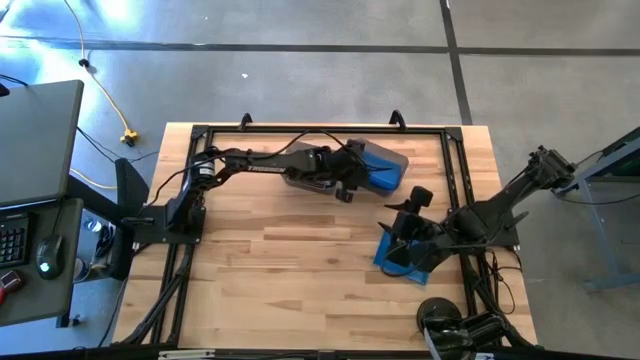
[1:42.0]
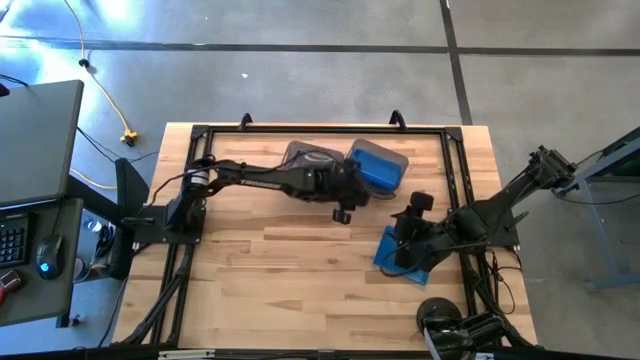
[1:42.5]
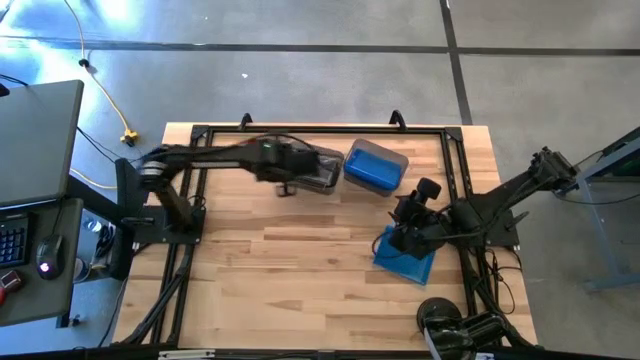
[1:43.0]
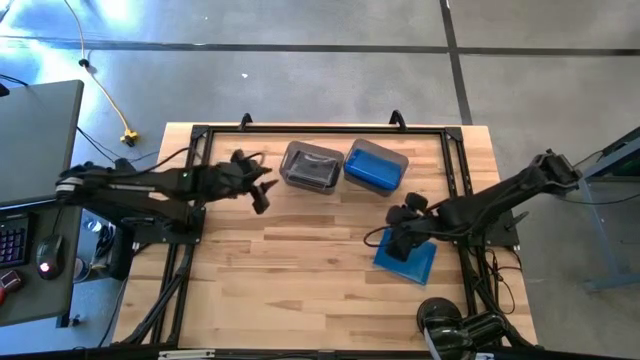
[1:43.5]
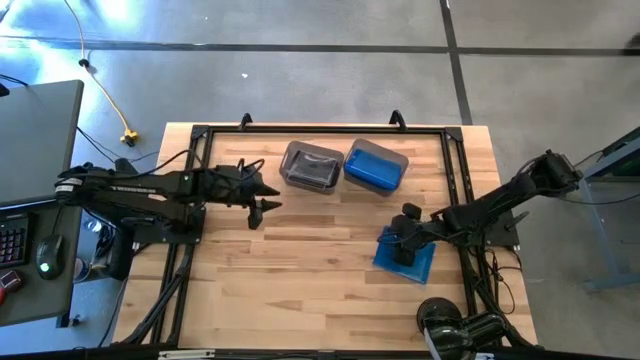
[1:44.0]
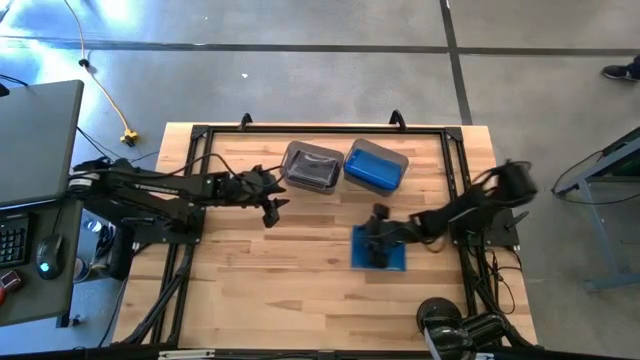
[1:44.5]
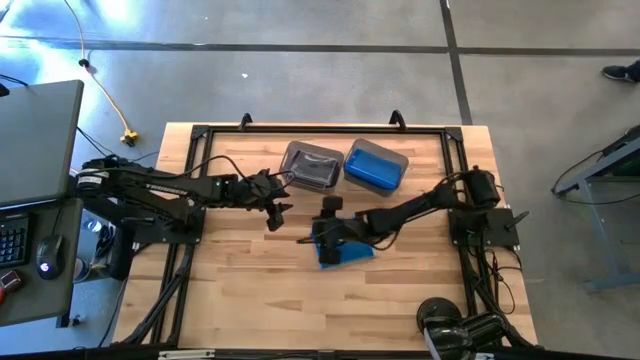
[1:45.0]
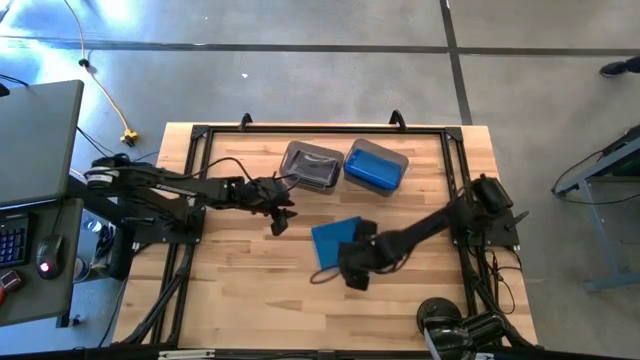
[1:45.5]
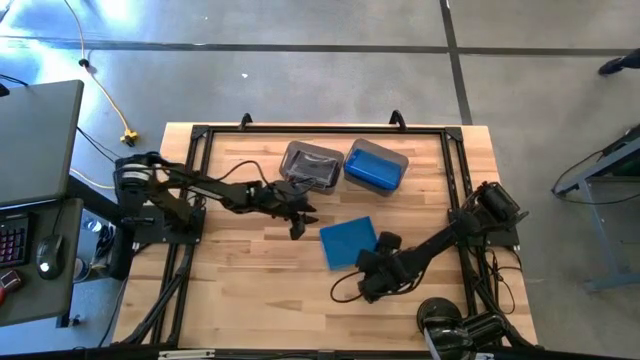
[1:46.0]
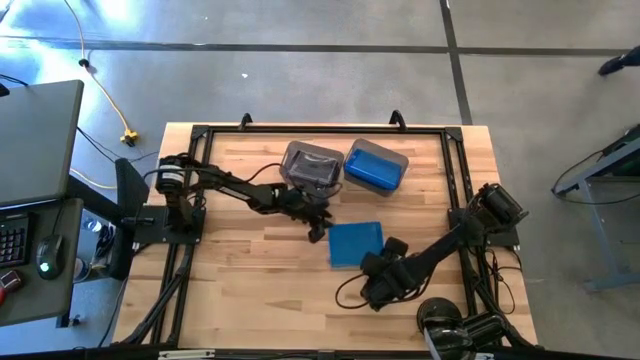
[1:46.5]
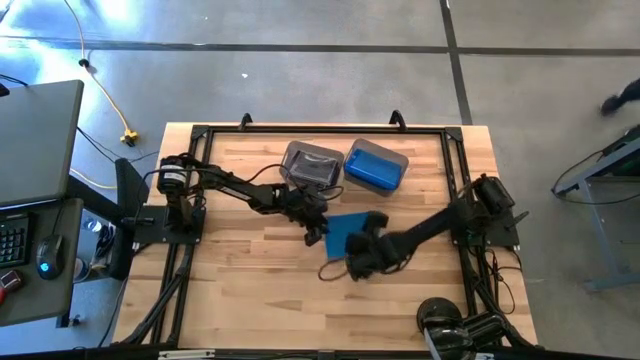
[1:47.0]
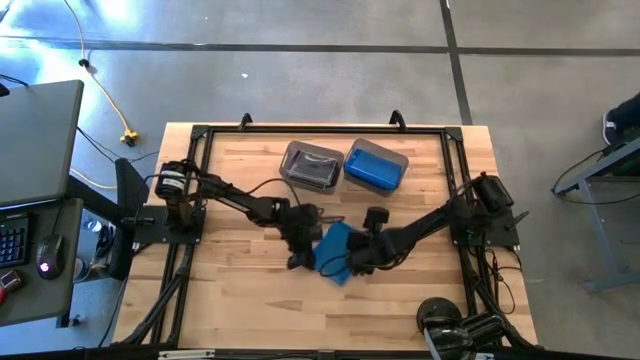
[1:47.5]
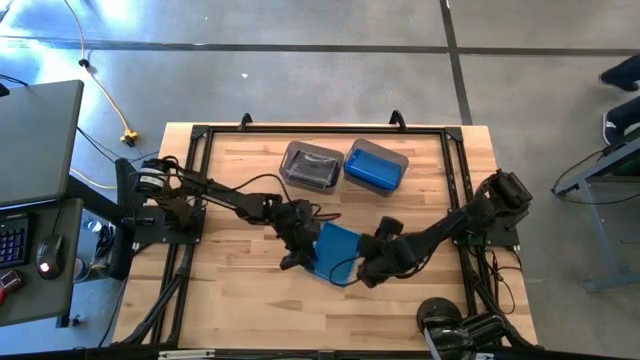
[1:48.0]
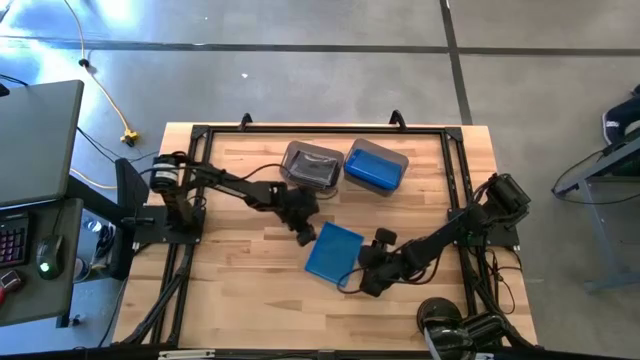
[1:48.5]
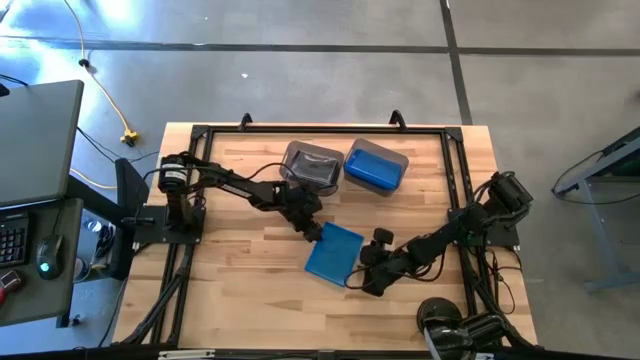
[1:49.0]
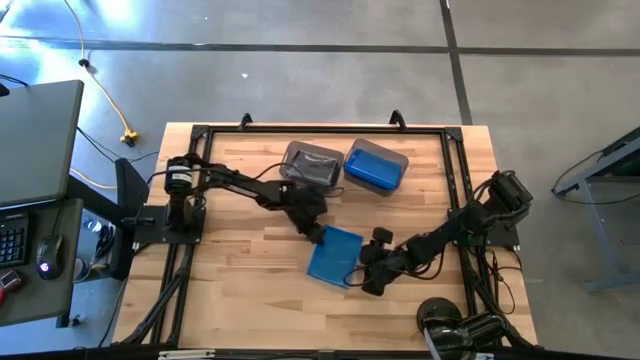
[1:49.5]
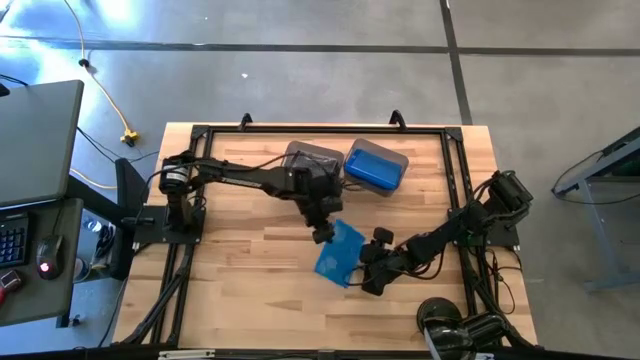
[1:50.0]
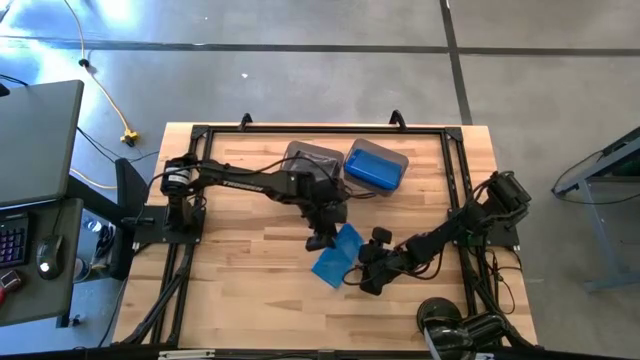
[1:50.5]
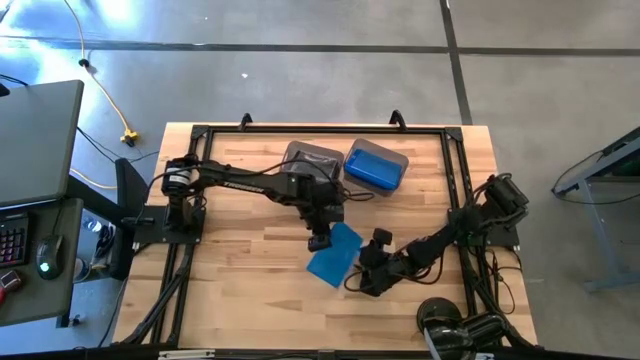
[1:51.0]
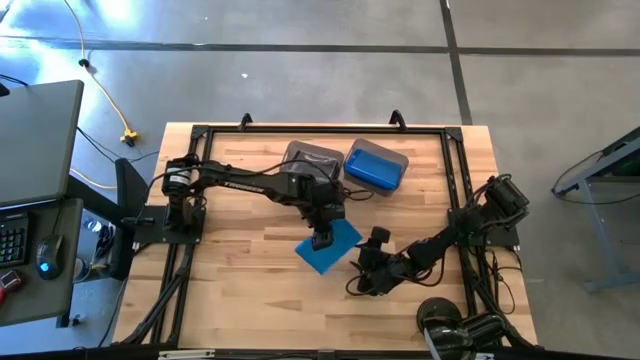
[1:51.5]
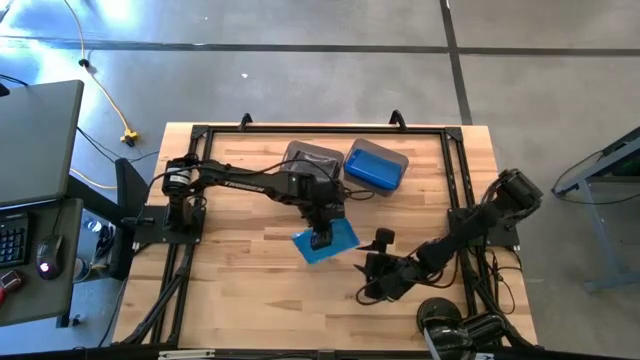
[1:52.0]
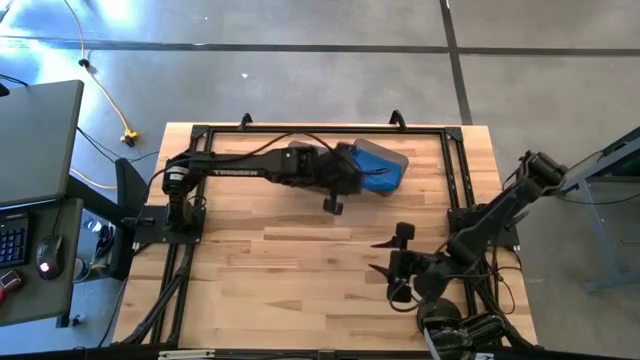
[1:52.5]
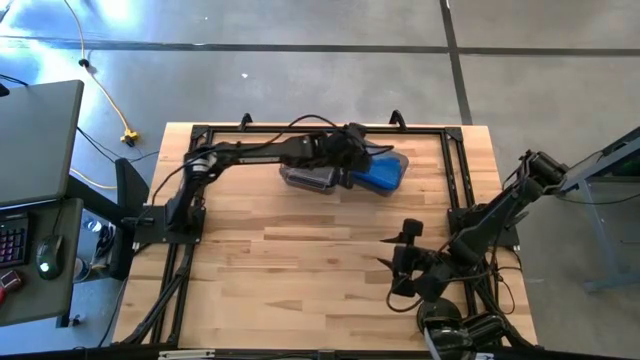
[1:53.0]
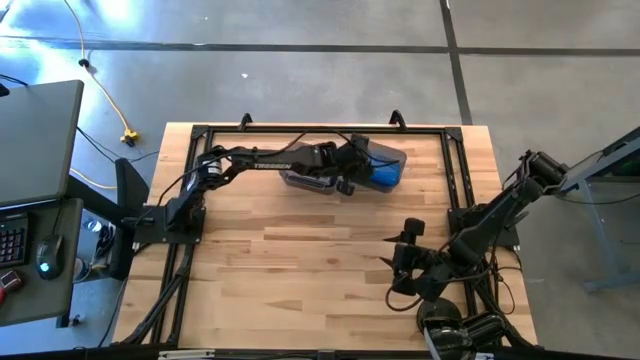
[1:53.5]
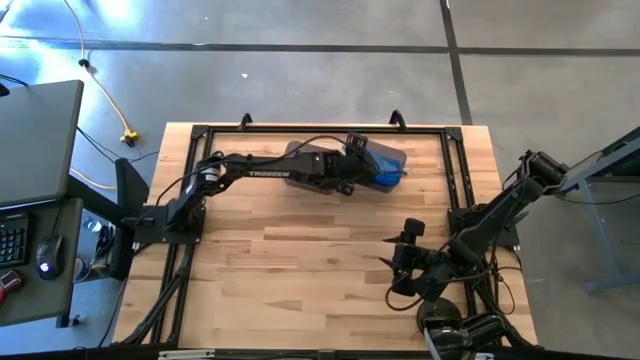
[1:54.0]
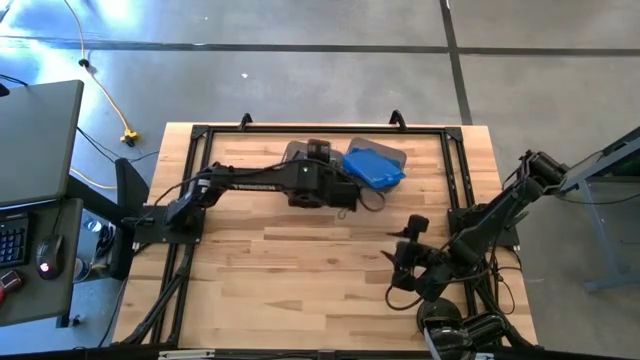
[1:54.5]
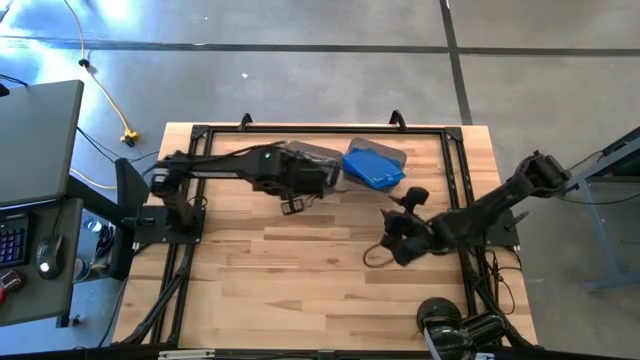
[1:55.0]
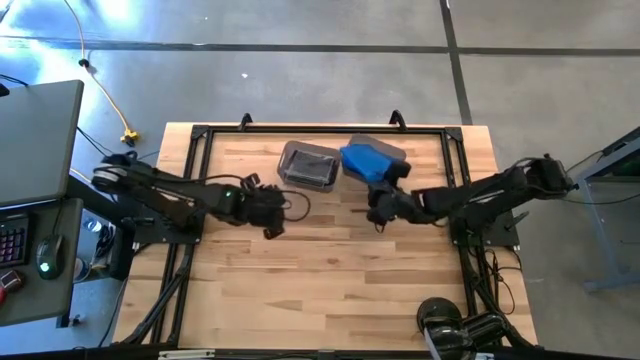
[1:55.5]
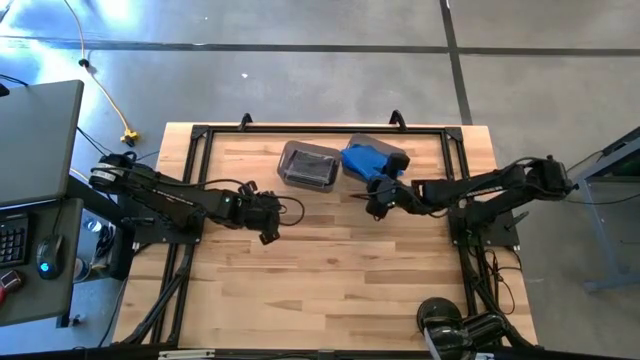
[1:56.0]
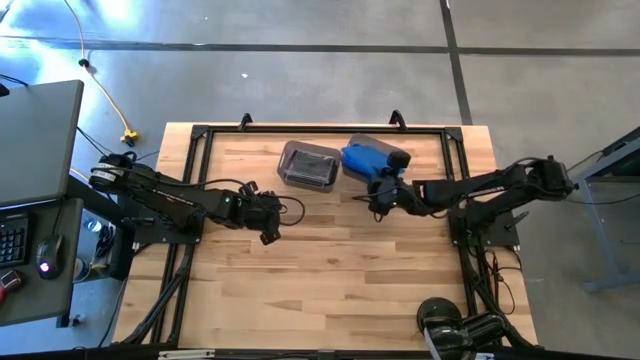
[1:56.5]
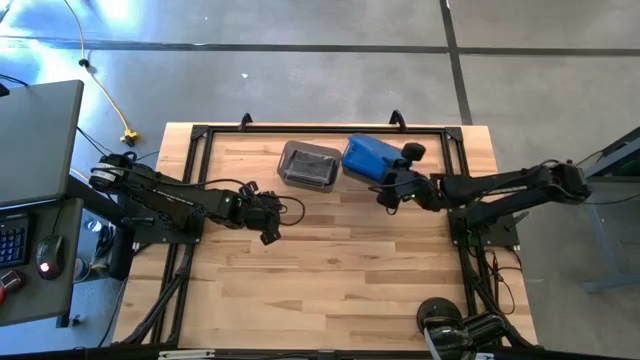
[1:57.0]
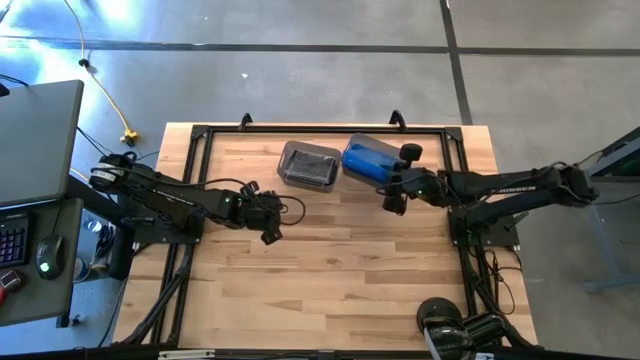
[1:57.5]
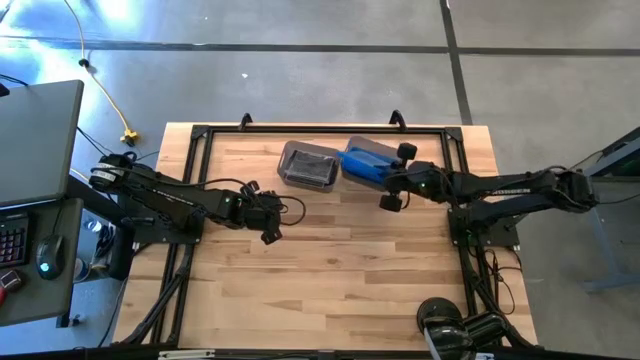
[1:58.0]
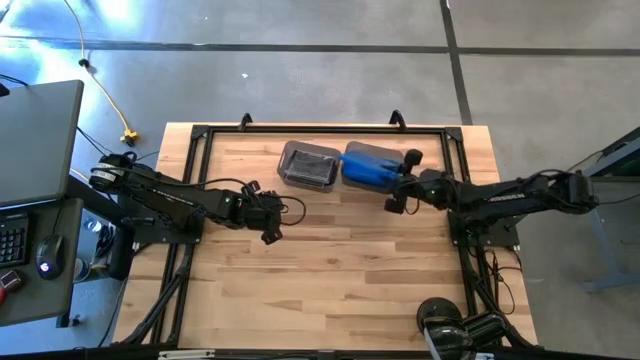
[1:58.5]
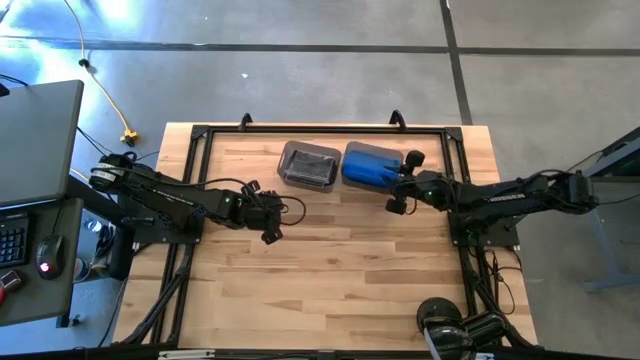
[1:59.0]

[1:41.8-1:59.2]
Task: Pick & place jewel cases by type
Put the blue CD case into the right black bin
